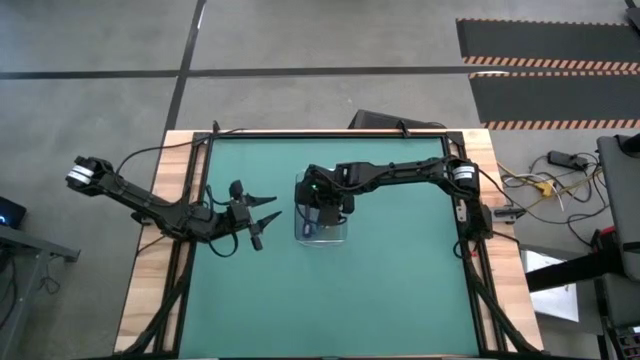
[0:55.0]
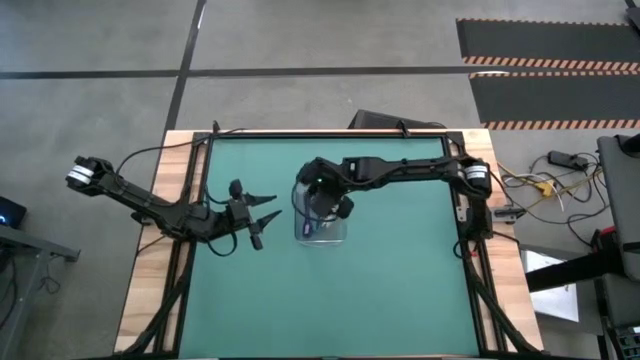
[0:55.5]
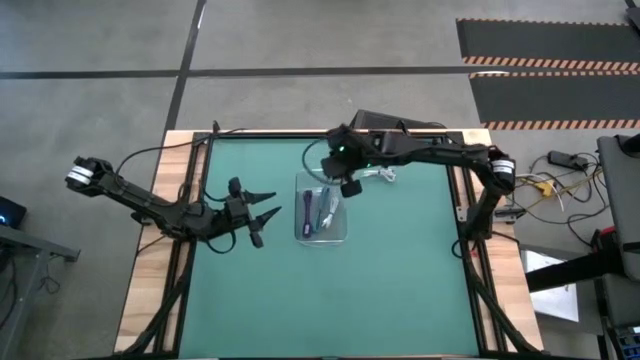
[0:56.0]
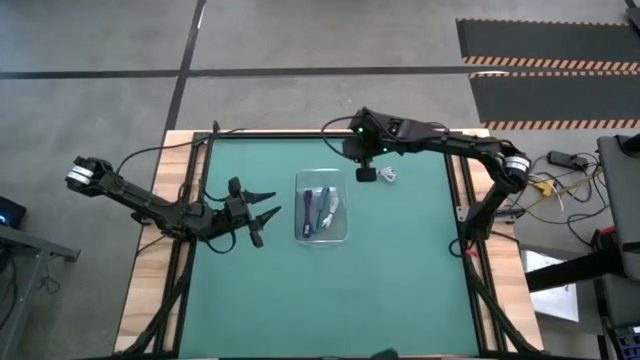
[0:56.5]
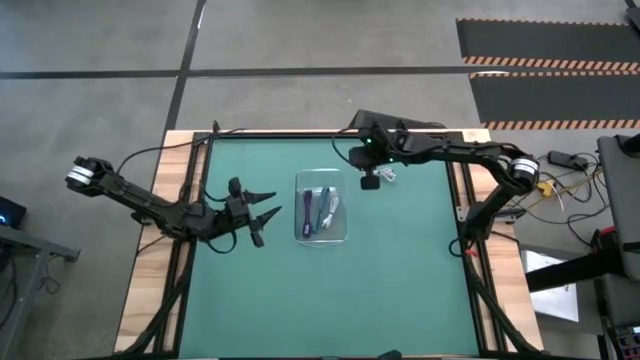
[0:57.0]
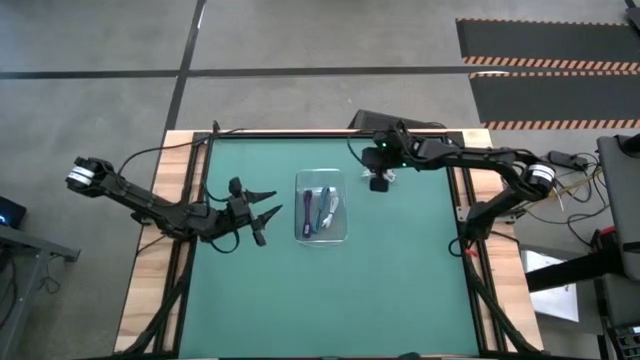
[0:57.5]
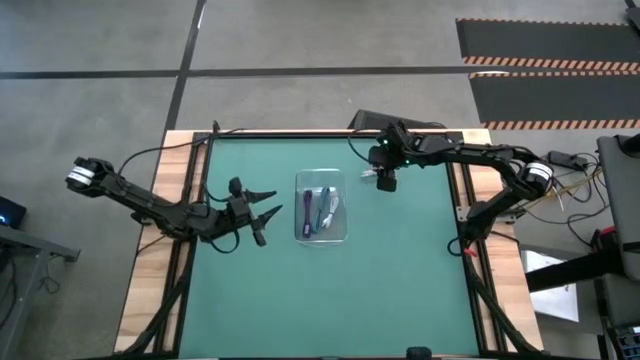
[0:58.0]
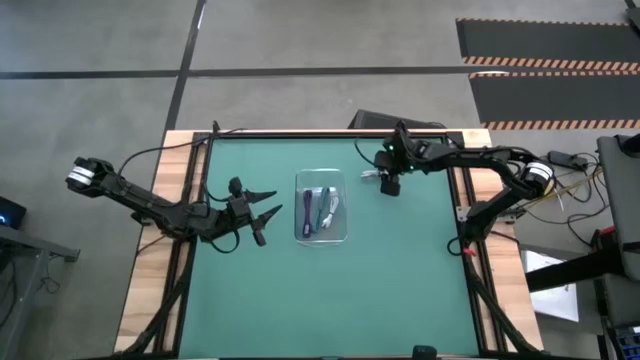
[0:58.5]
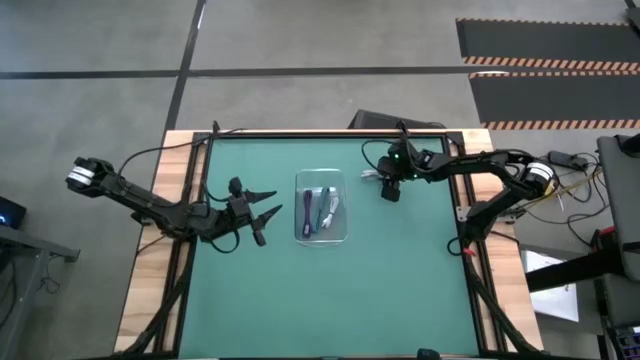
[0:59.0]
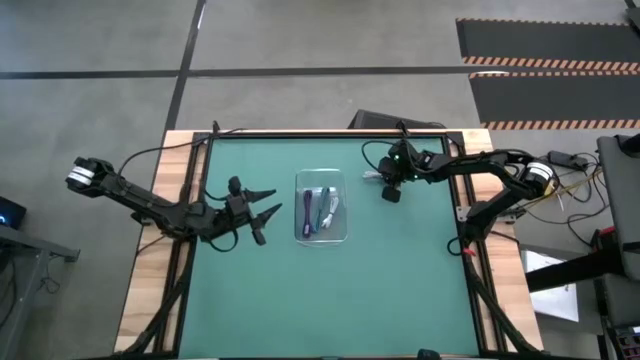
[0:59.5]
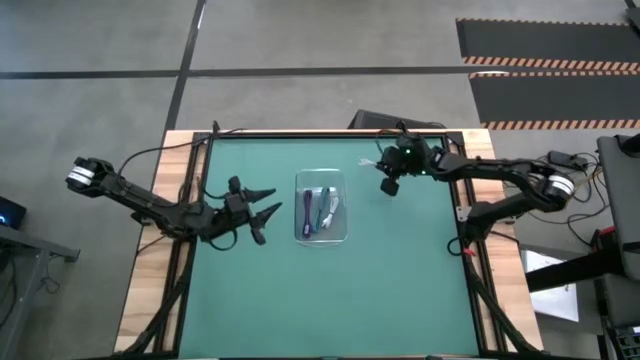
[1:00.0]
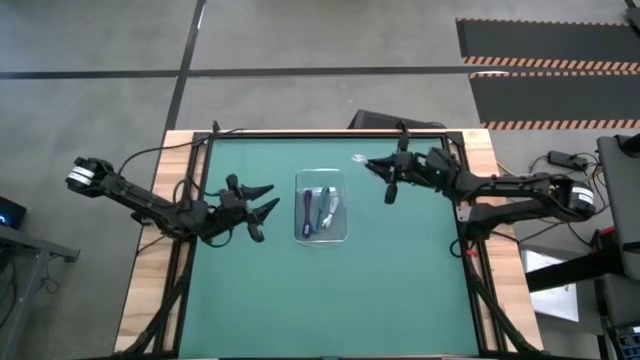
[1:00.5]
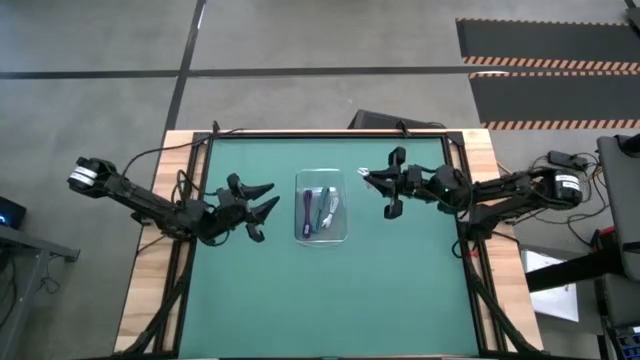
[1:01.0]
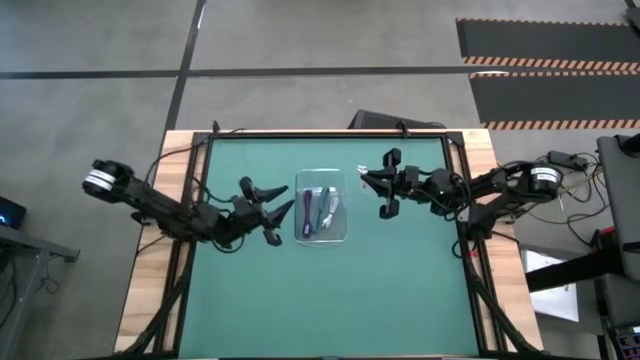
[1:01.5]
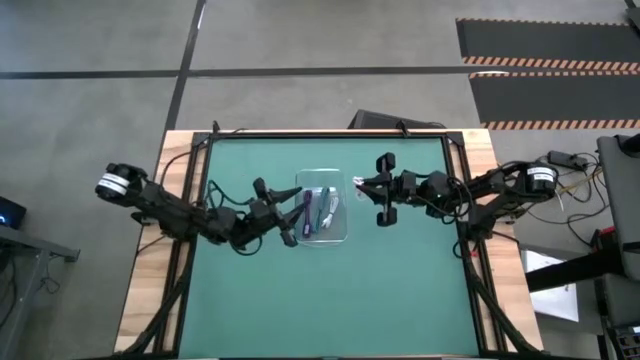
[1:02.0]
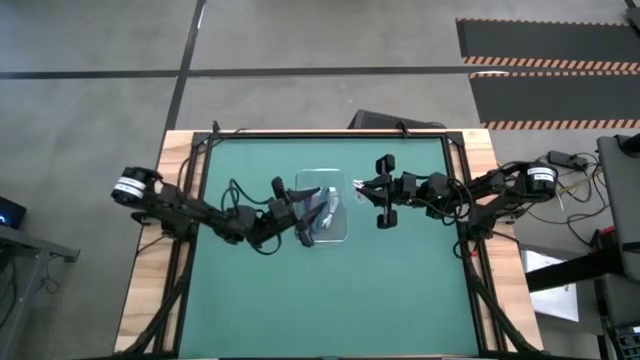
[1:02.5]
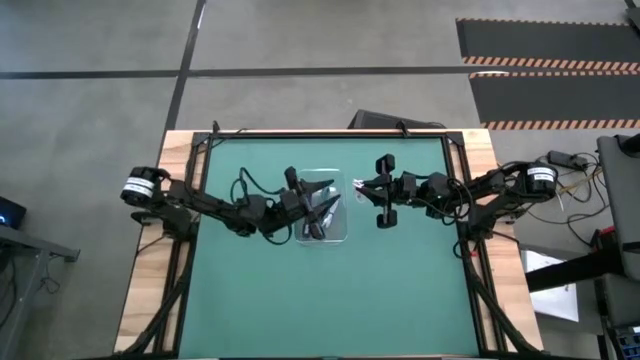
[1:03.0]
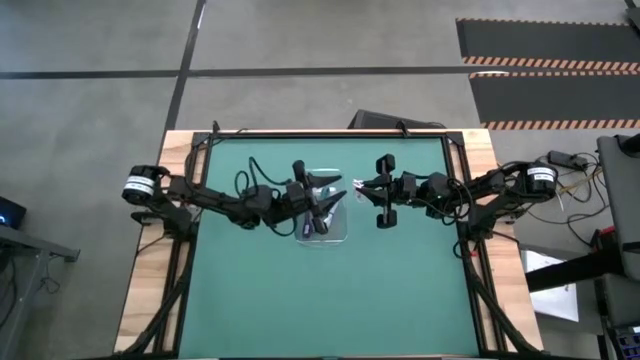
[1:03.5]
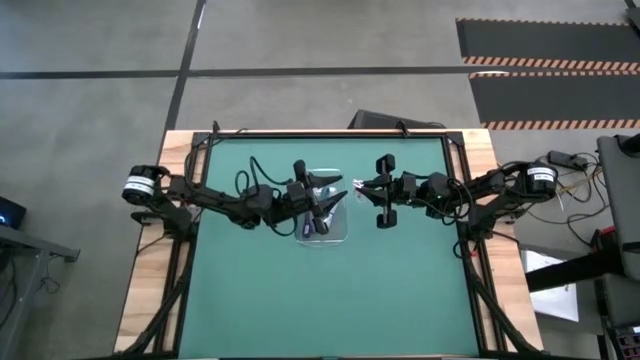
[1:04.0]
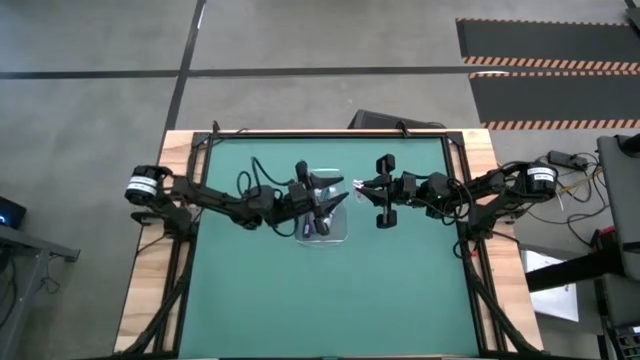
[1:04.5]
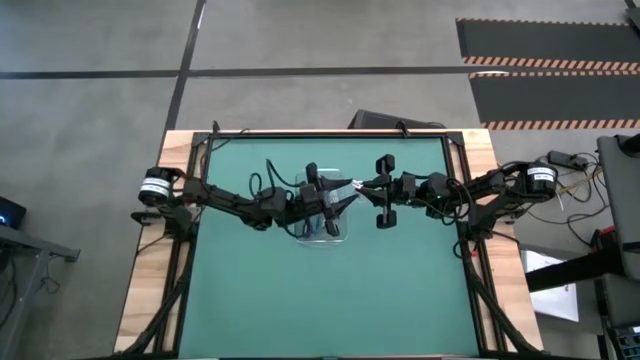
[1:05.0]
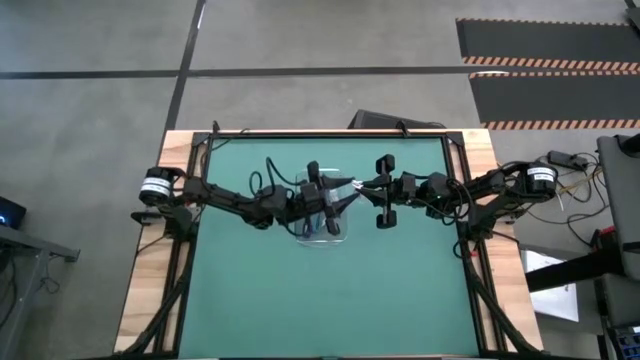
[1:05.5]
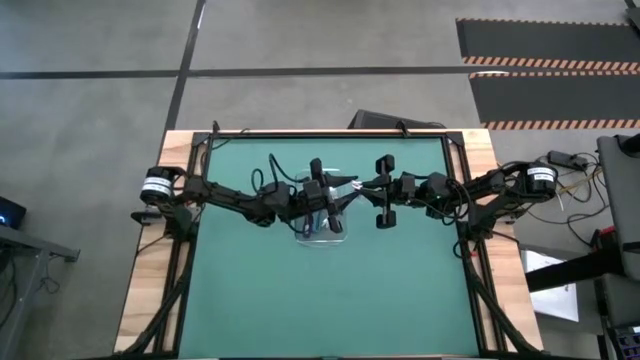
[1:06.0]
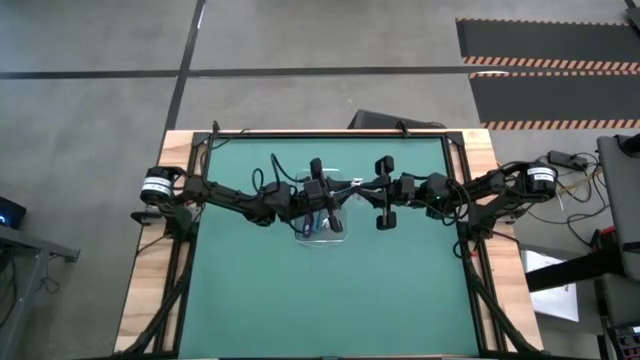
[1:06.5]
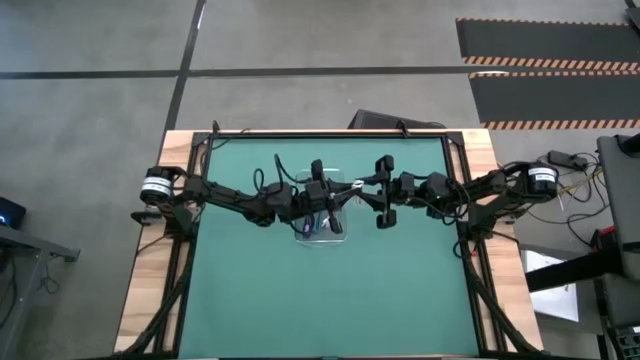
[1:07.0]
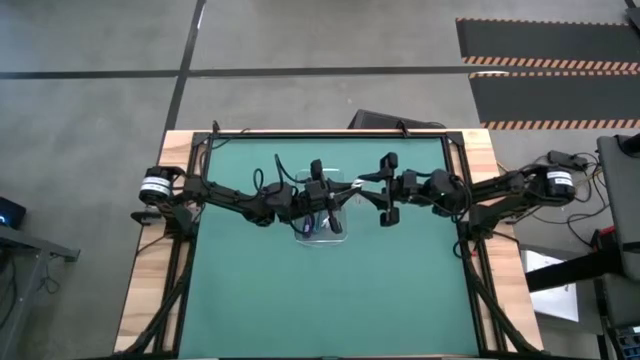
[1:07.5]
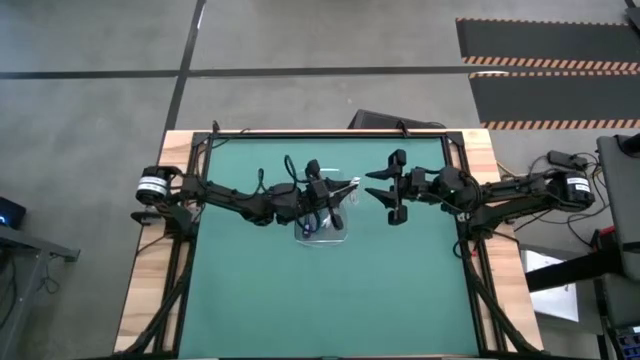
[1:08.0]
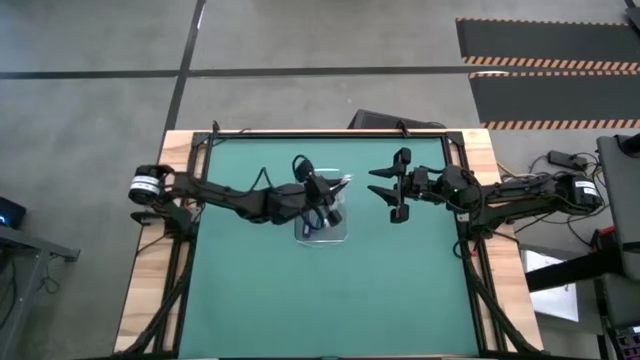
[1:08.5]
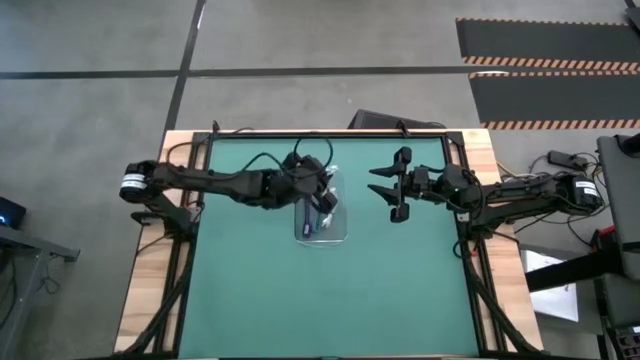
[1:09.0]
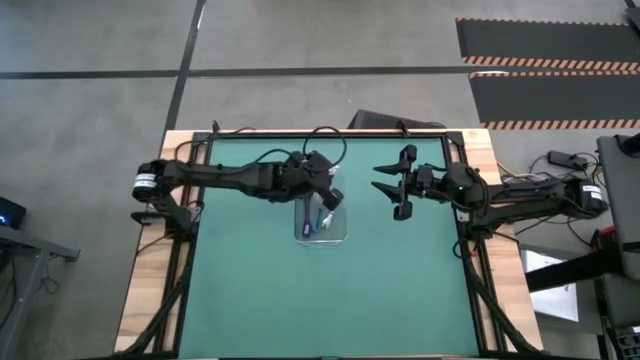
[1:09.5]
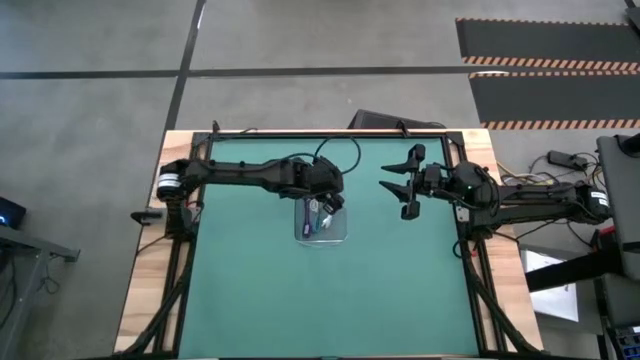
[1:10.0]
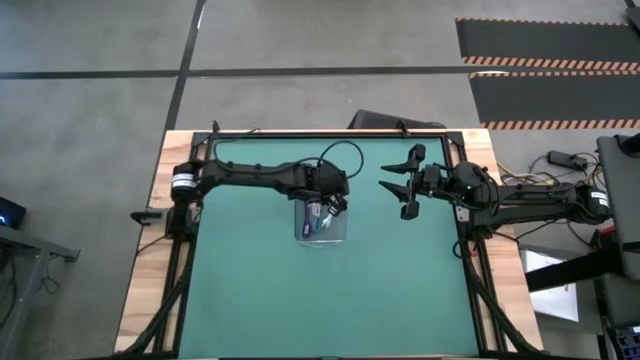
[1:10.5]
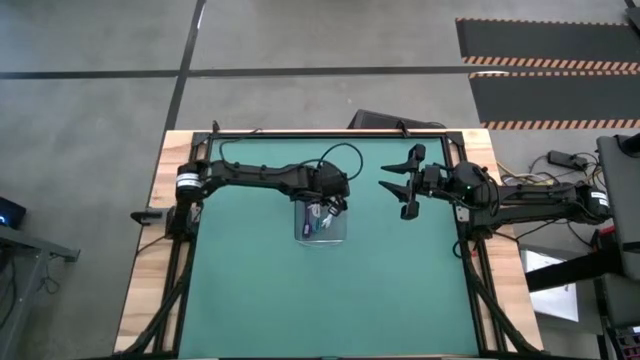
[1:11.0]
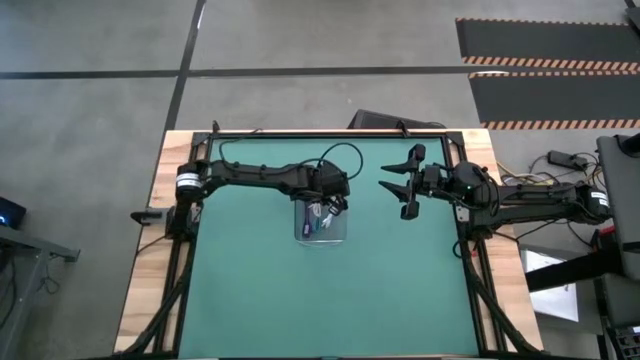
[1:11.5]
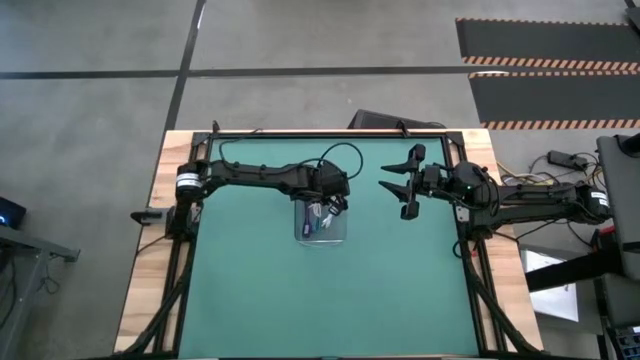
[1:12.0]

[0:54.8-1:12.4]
Task: Pick and place USB-C Cables
Put the white charger cable into the transparent bin
